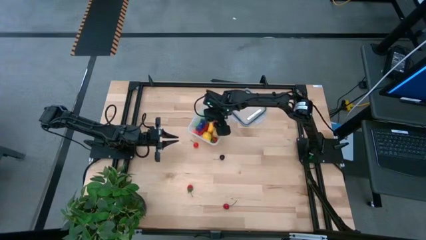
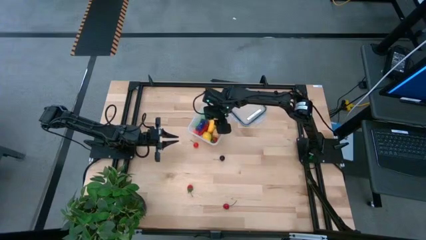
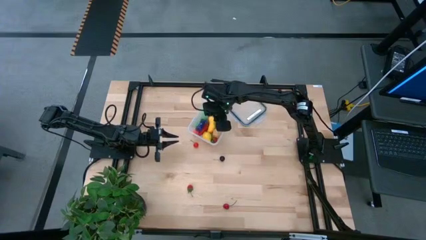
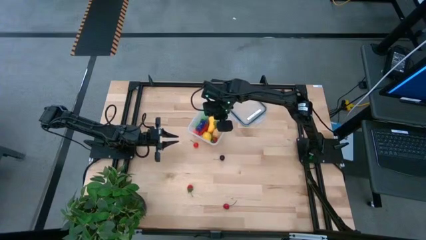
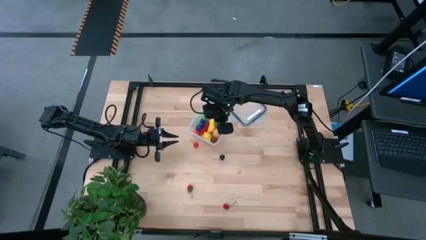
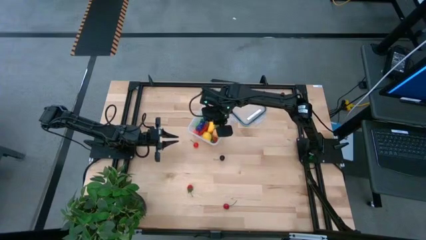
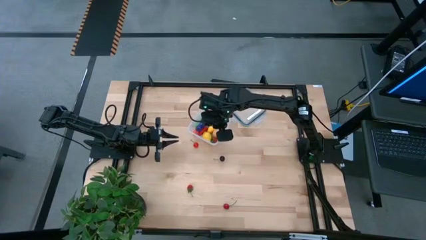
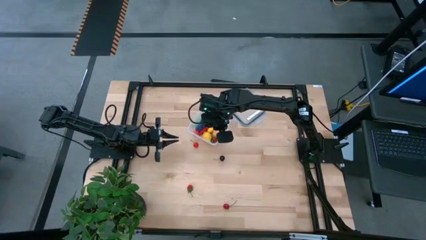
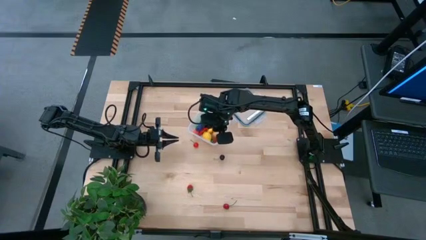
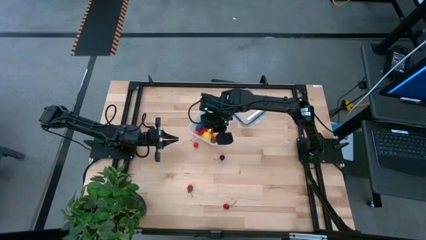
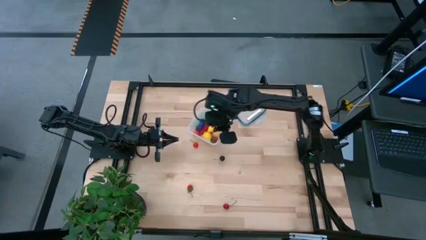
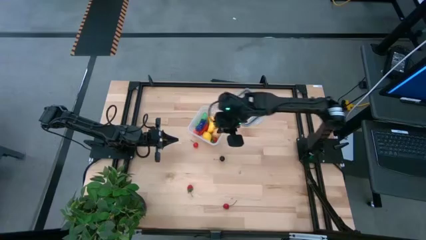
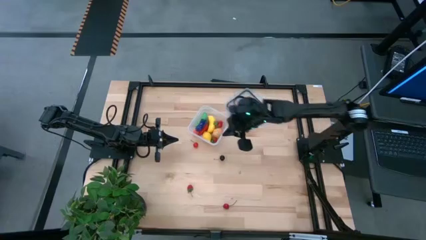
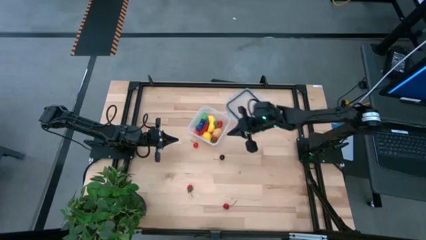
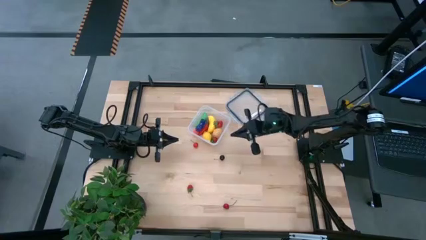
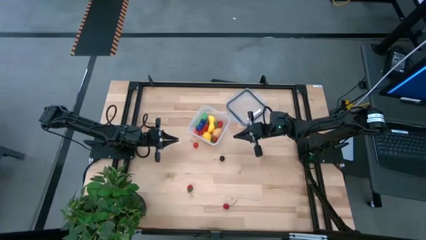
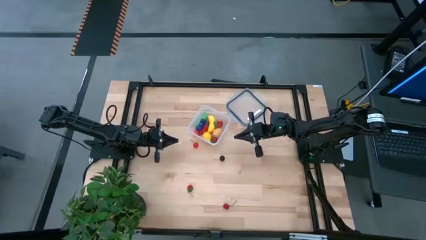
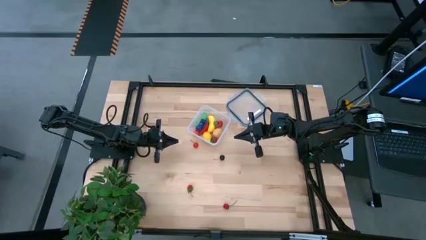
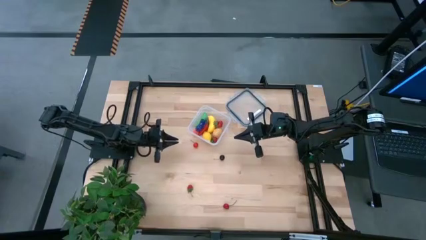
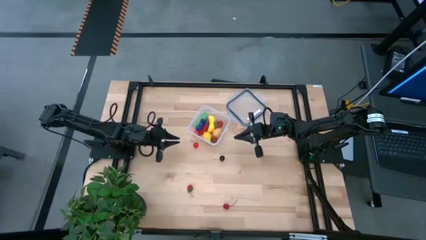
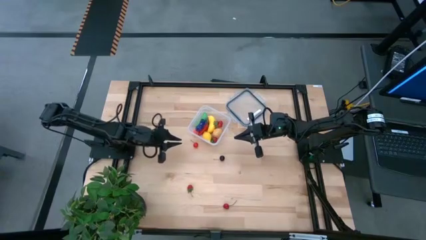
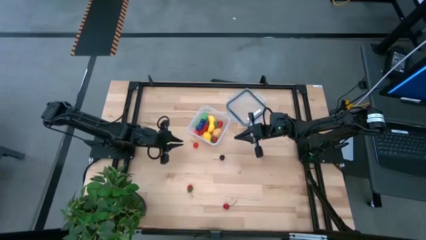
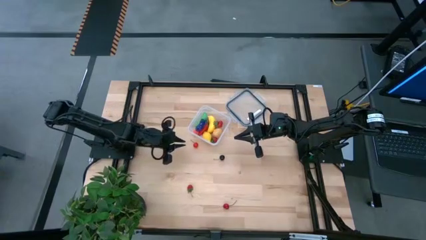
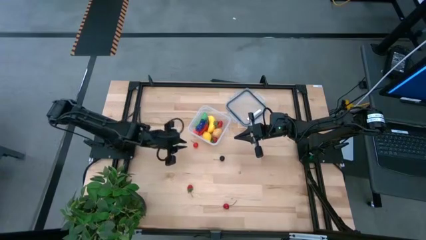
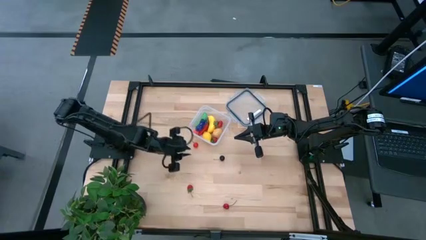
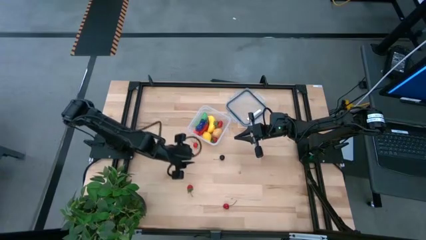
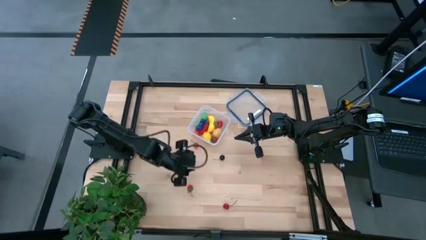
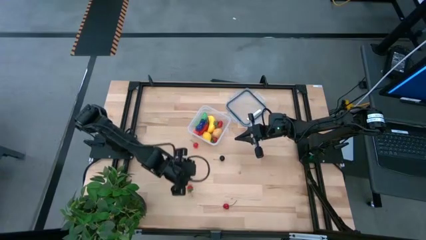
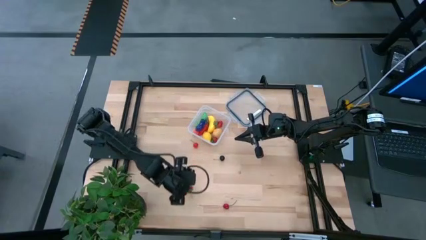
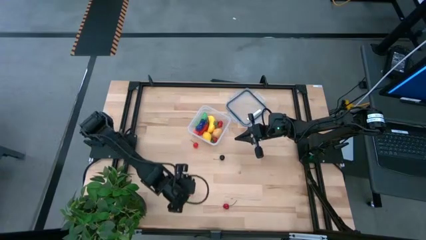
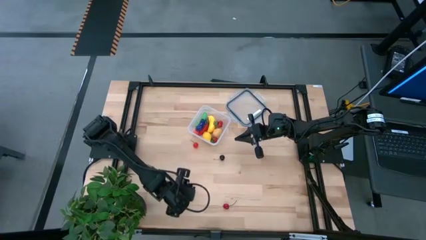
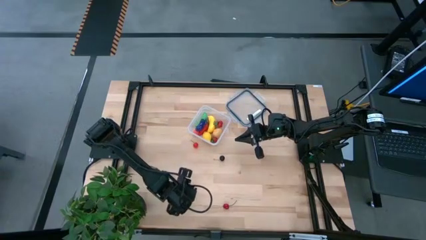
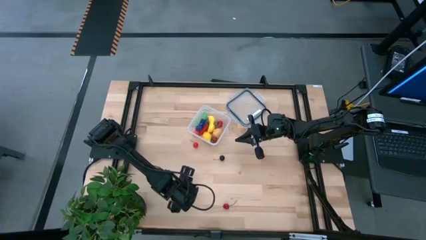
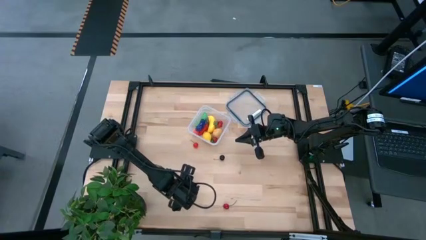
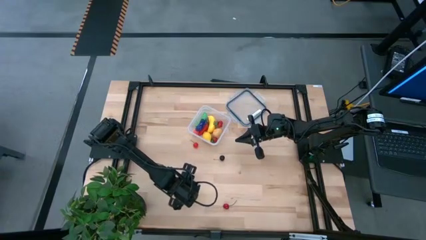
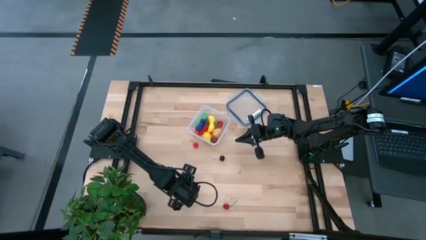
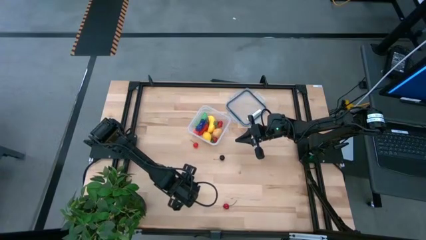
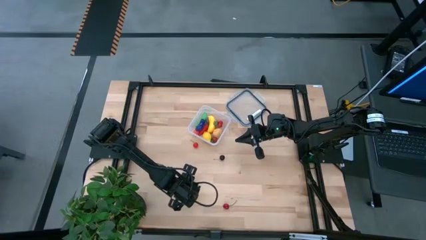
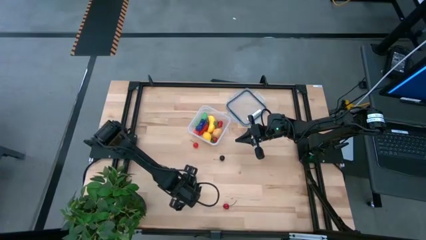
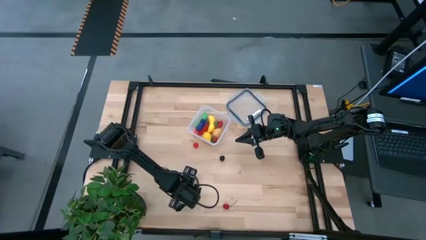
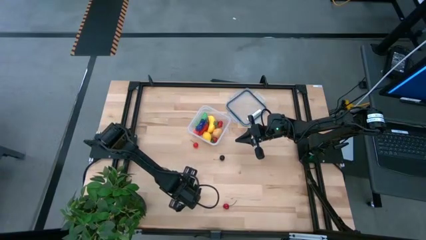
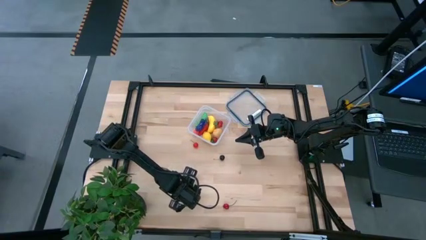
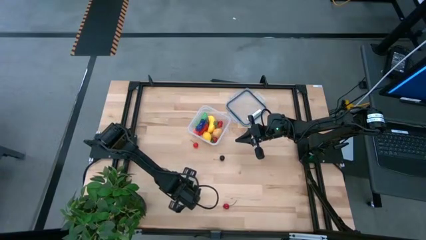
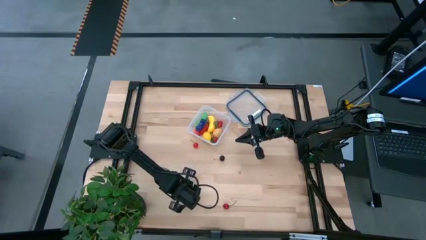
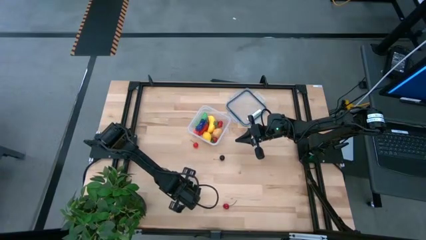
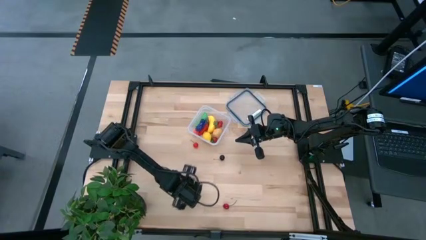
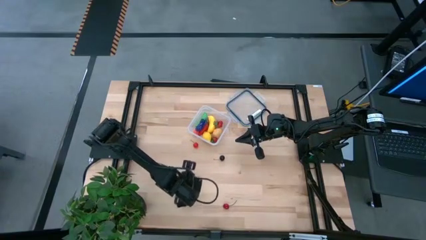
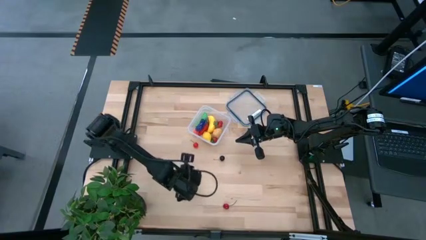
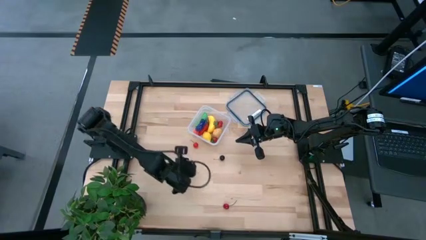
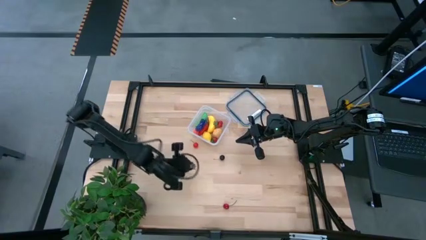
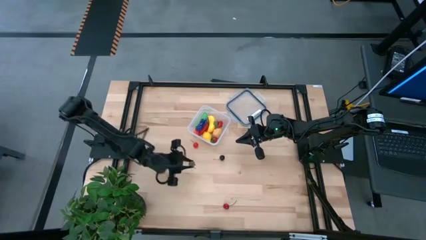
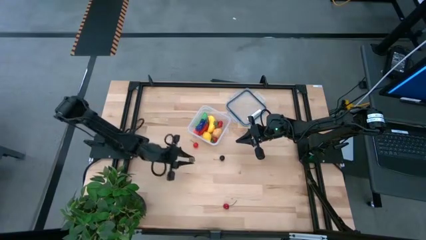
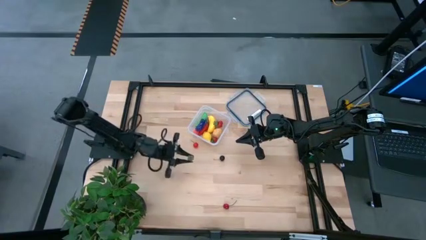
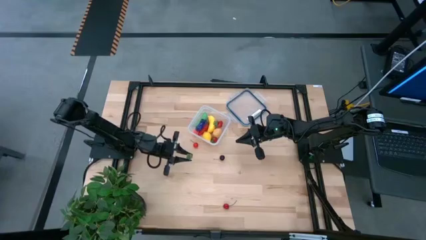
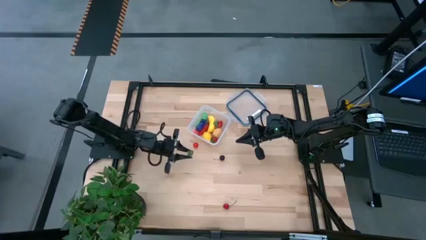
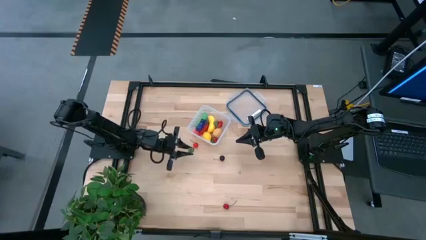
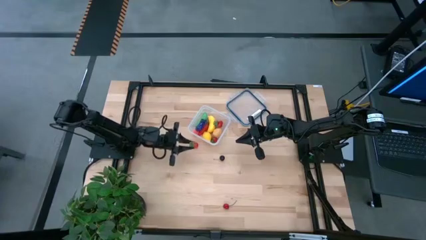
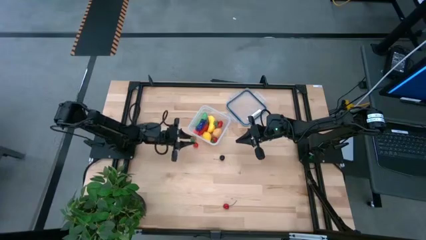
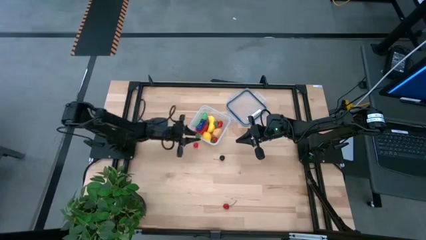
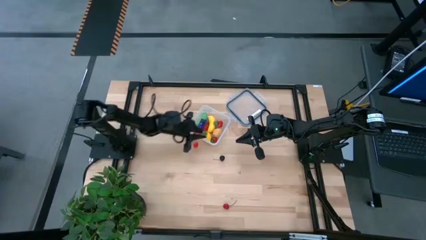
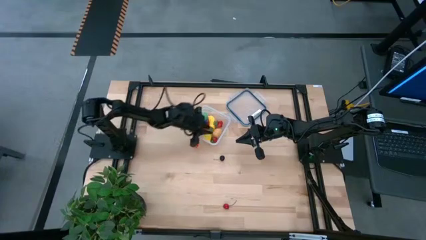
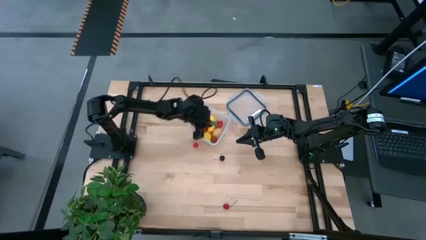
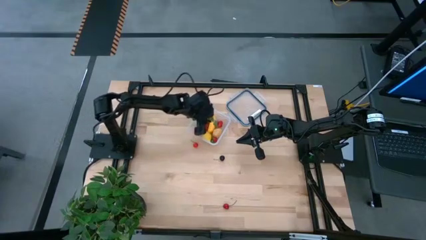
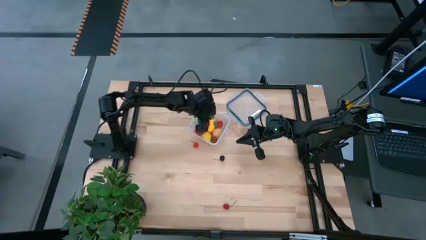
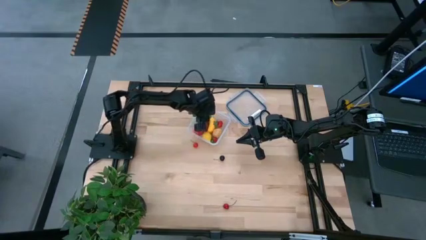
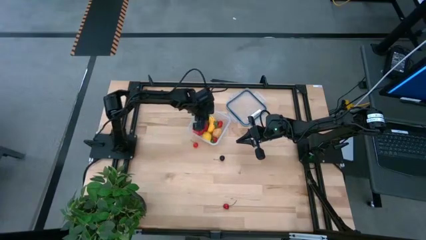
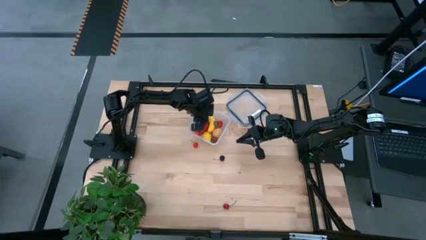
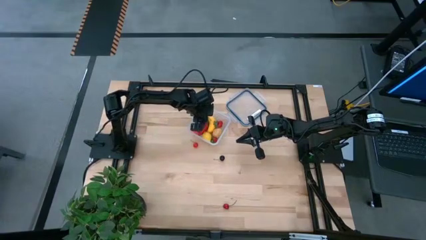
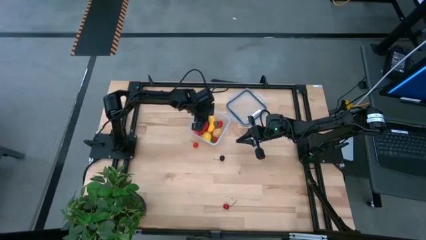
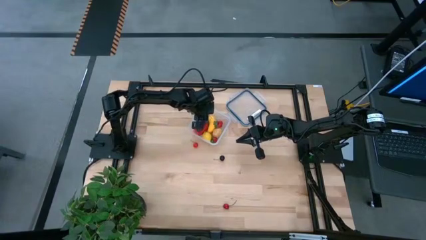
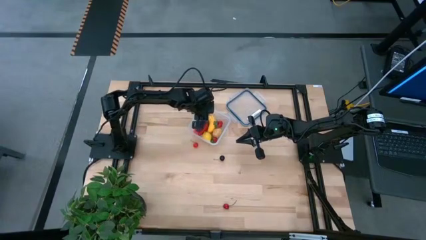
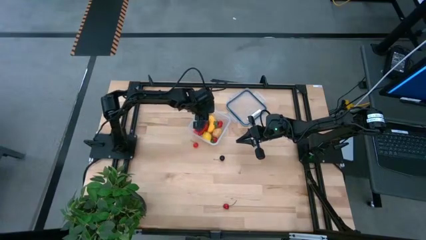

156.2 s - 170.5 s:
Task: Pick and placing Produce into tupperware
Put the red strawberry into the transparent container

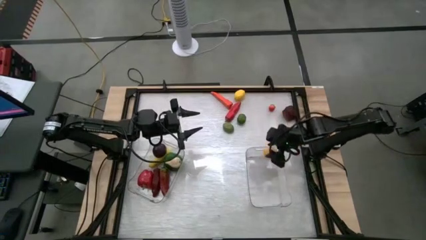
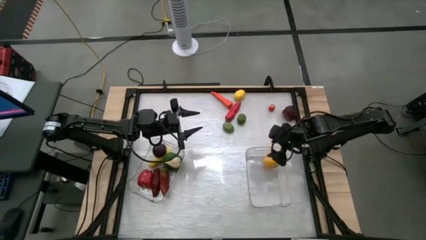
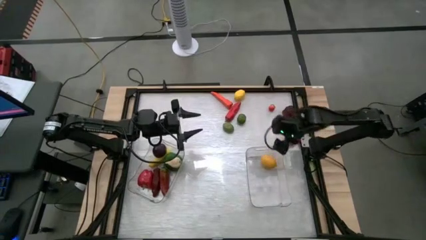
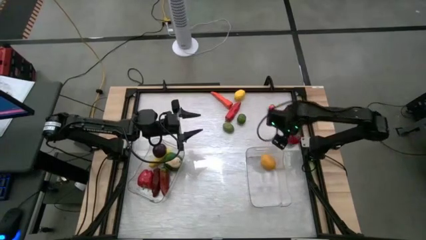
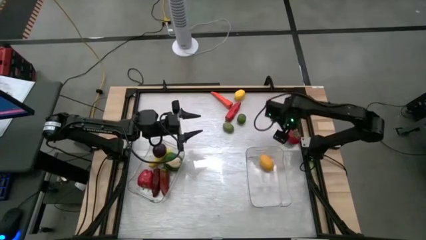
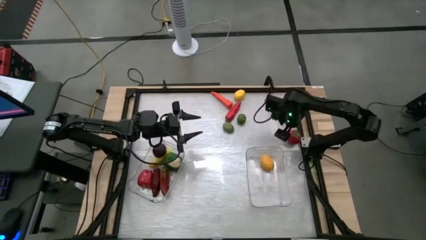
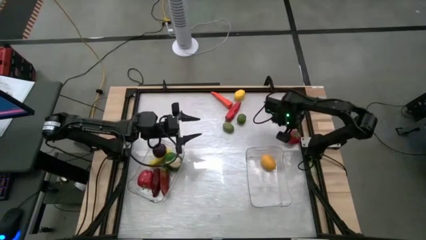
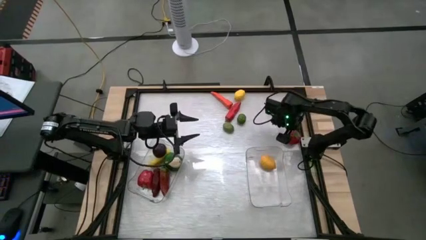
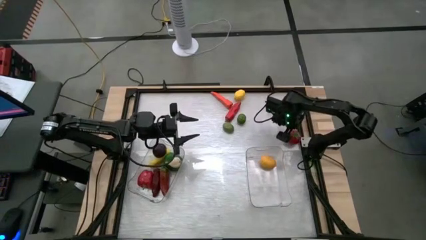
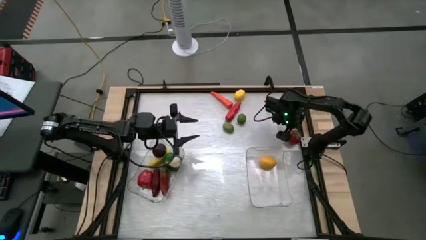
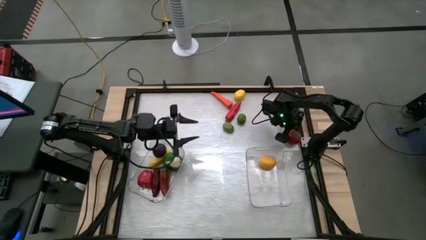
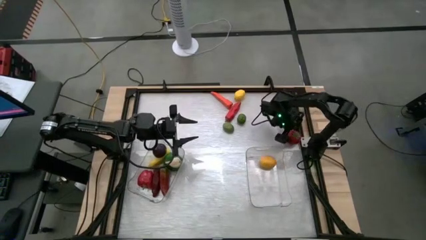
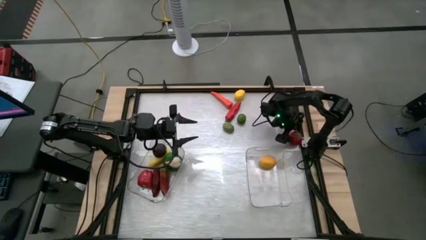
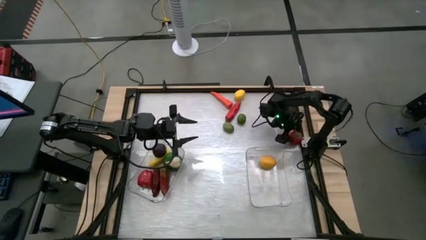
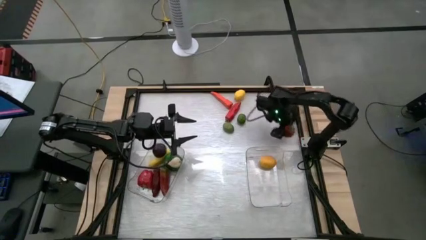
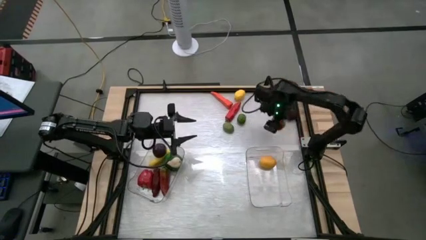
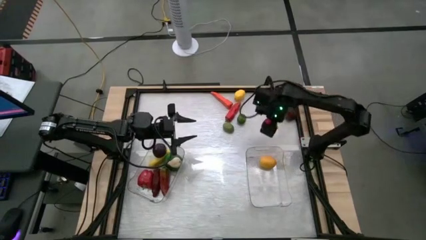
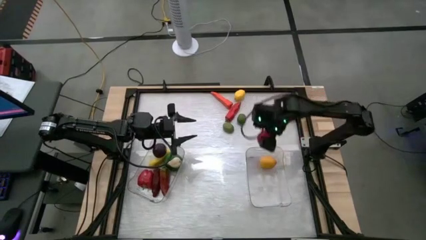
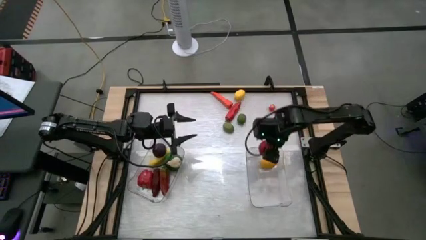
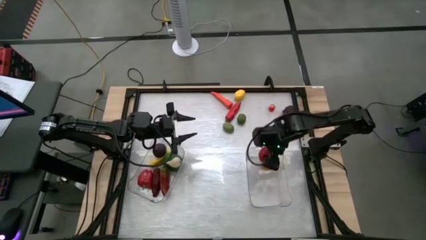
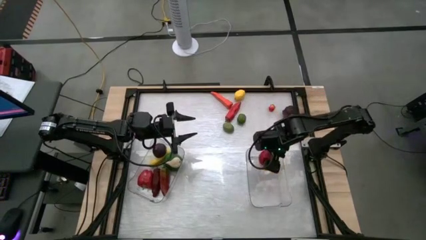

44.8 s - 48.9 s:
Task: Sort produce into baskets
Put the red tomato into the right transparent bin
